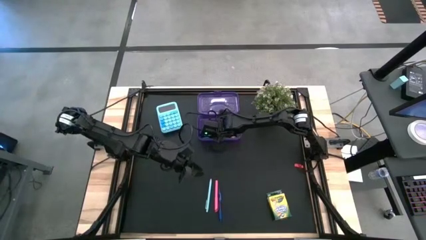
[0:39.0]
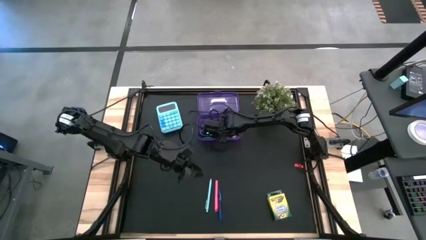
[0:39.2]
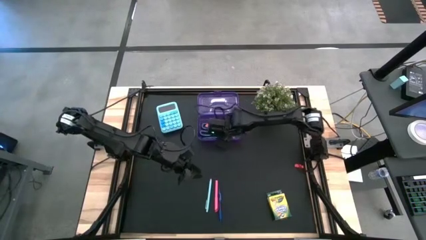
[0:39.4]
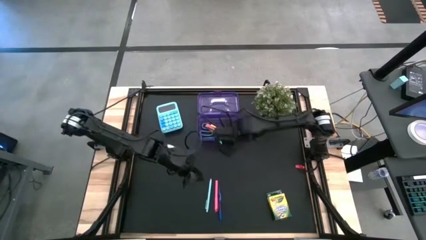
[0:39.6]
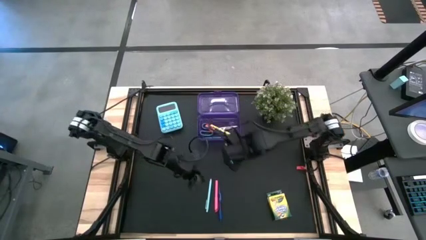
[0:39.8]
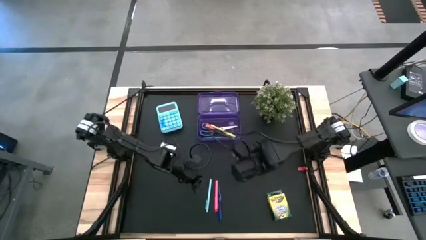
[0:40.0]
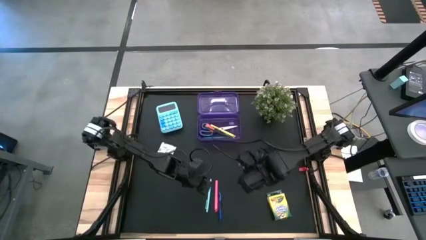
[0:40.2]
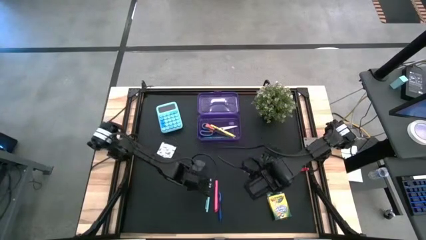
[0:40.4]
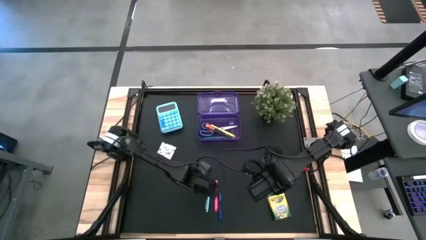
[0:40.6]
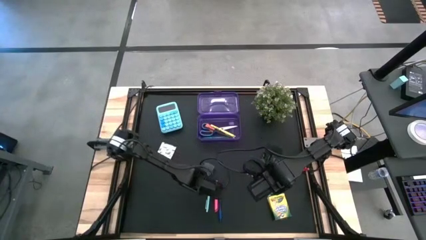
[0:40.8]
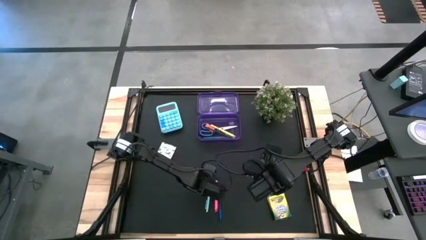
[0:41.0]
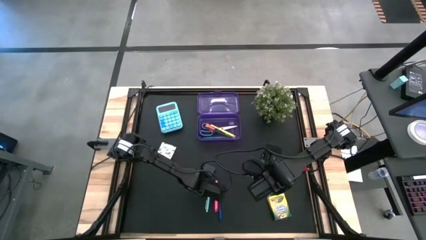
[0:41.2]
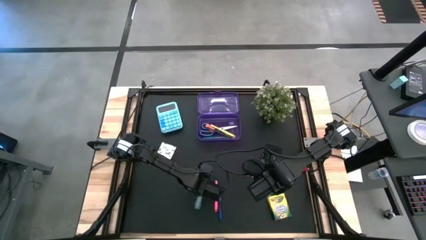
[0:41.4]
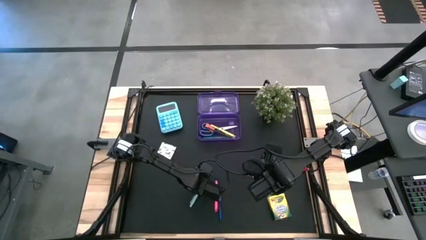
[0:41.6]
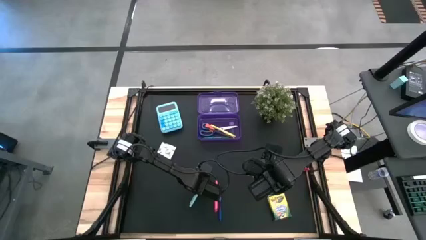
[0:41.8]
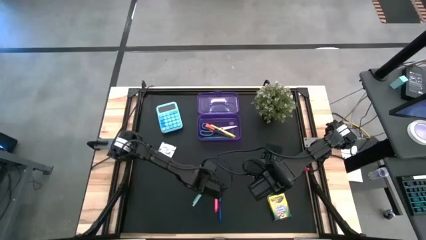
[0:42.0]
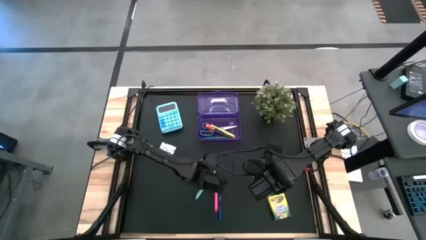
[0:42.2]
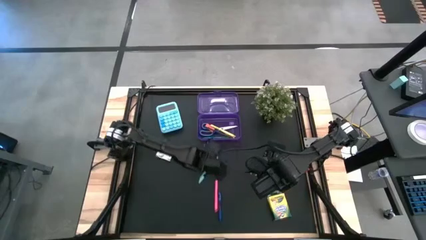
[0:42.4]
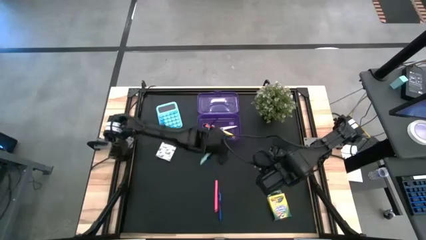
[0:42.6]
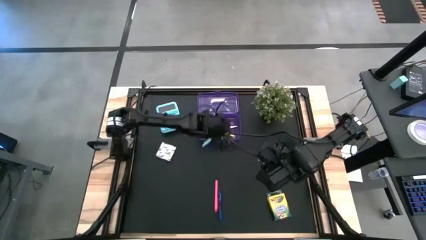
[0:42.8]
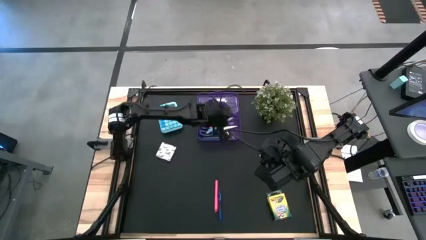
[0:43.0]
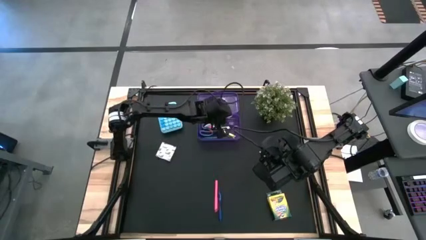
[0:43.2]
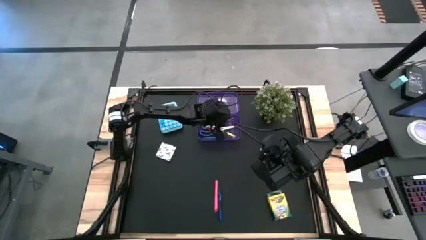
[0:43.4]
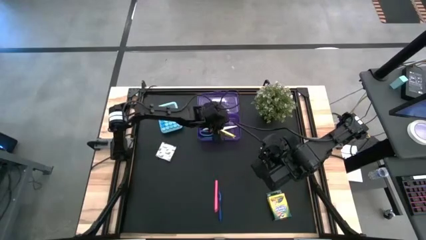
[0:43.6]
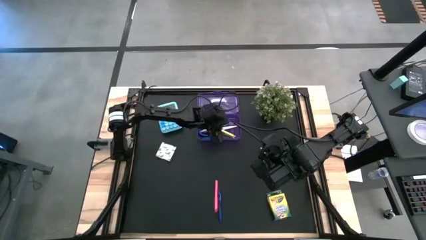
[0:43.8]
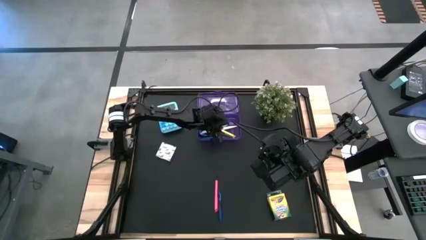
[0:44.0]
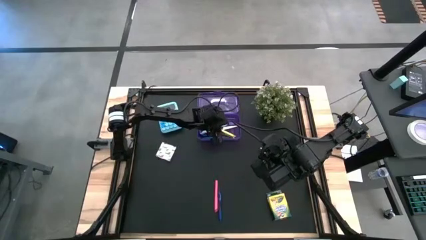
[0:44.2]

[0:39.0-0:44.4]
Task: Pack school essentials
Put the light blue pen into the purple supply box

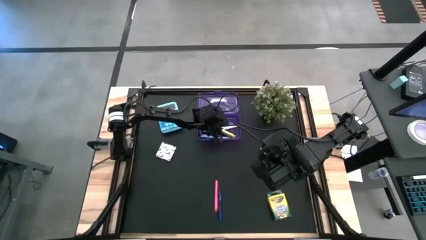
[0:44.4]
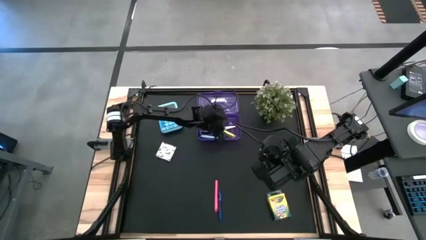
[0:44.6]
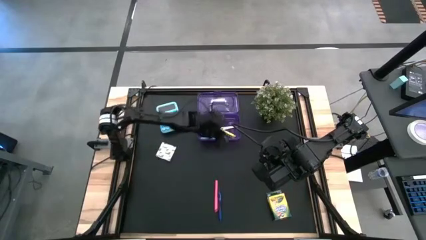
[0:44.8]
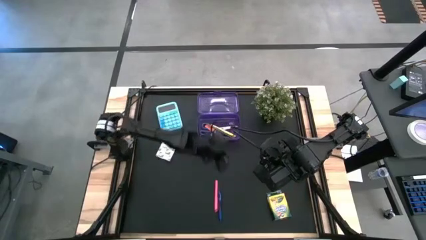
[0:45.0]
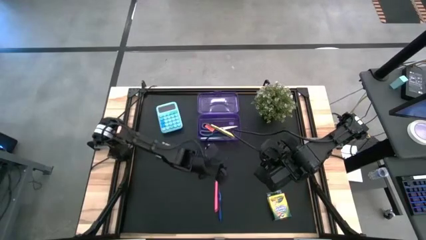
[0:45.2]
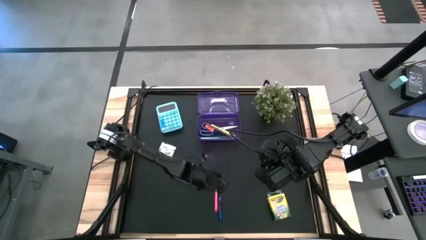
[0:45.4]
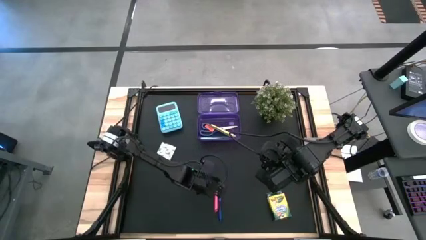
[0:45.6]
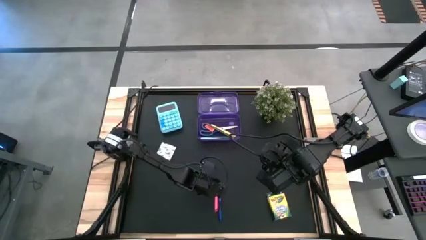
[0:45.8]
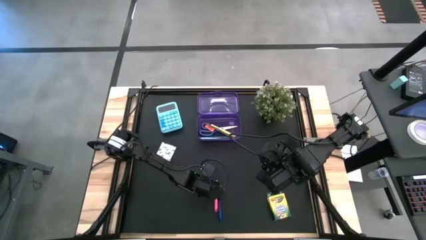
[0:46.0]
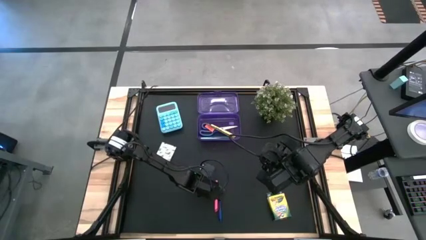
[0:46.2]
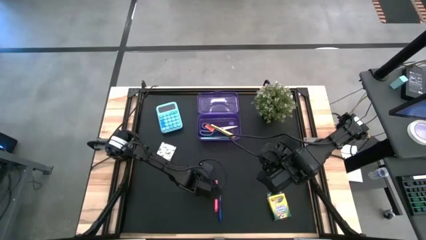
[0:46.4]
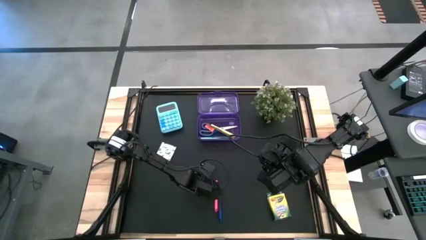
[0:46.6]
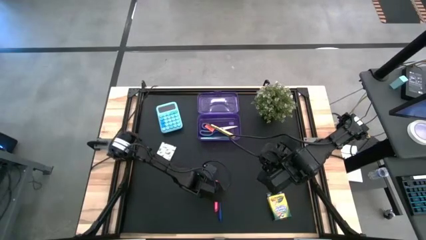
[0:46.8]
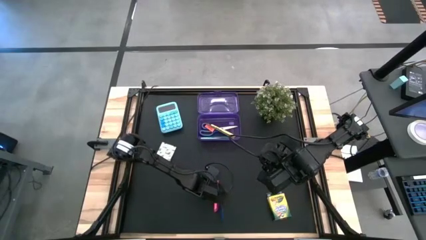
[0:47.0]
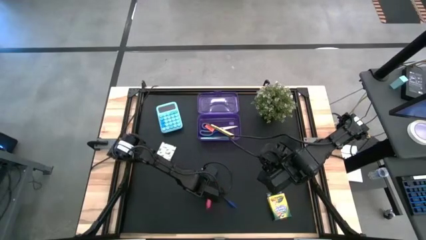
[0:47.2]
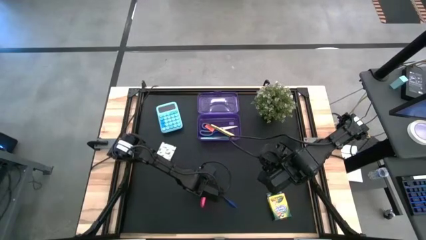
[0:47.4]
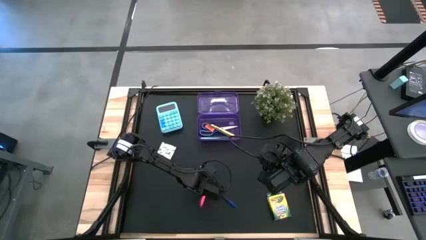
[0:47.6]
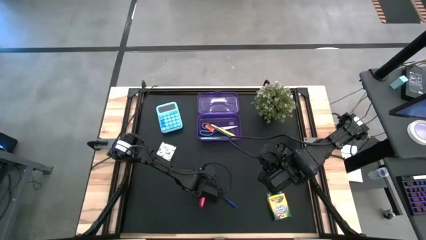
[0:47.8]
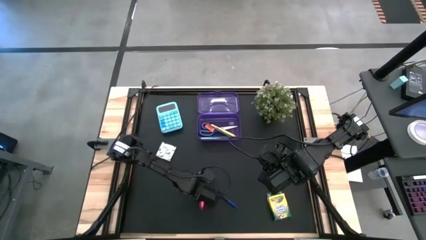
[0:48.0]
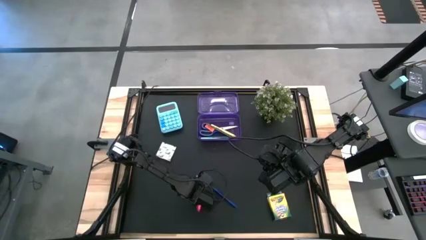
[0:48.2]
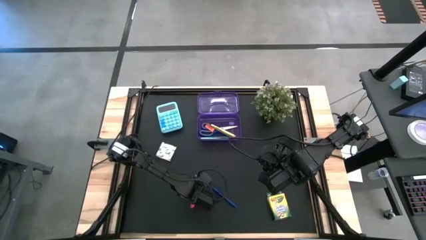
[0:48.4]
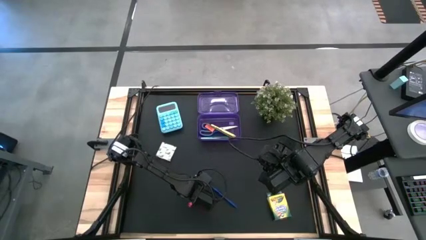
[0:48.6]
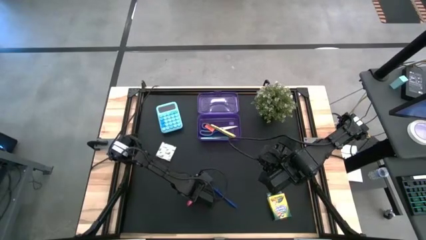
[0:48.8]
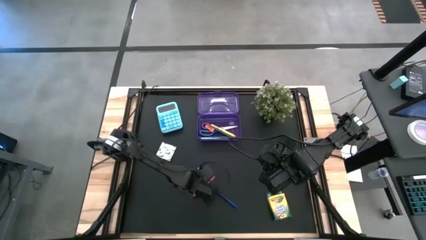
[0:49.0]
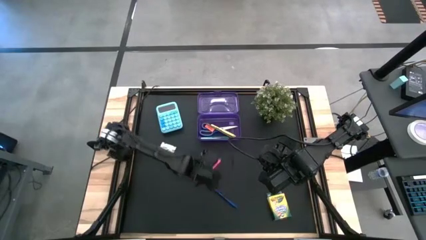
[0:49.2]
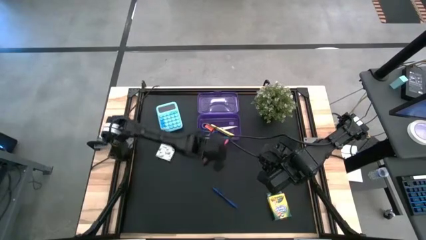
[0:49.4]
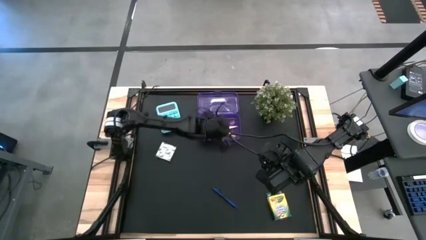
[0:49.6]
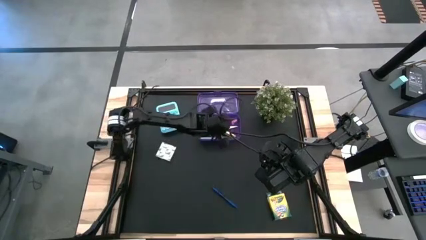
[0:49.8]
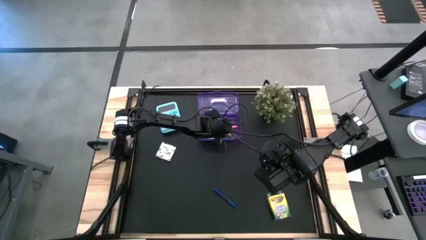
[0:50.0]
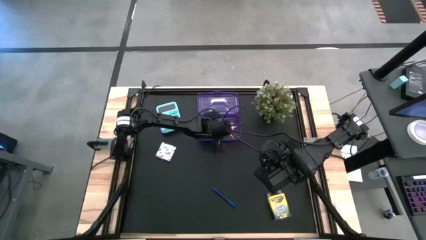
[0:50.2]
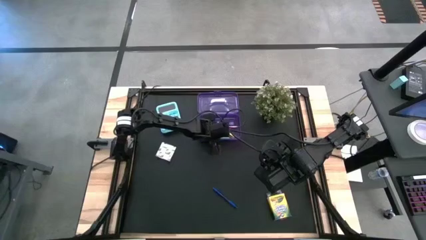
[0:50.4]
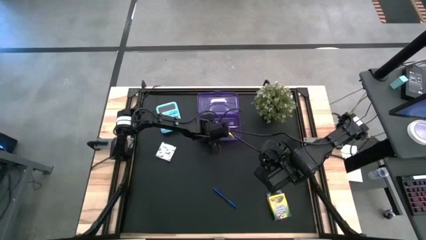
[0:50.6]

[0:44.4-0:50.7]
Put the pink highlighter pen into the purple supply box

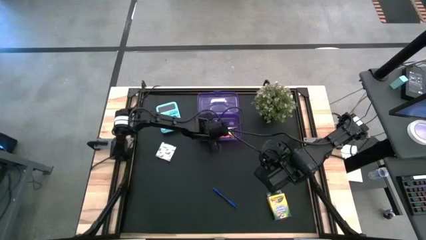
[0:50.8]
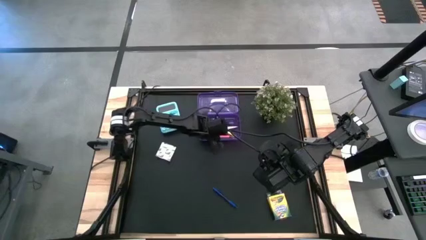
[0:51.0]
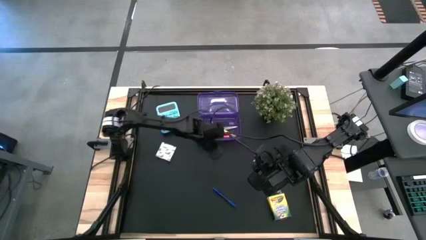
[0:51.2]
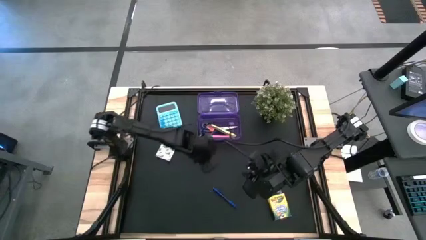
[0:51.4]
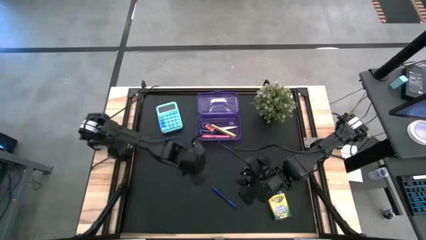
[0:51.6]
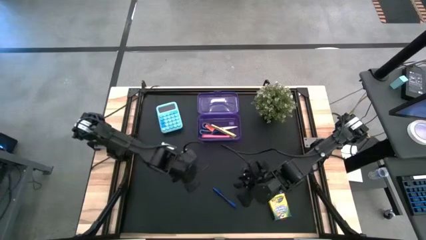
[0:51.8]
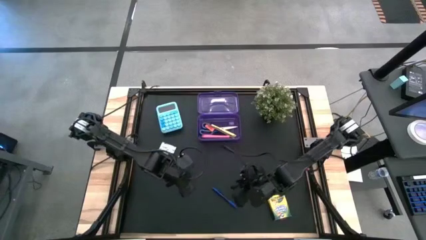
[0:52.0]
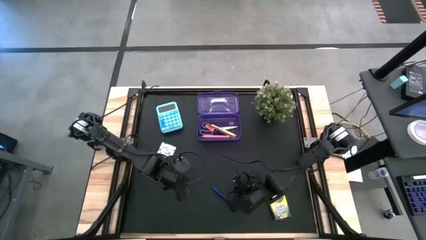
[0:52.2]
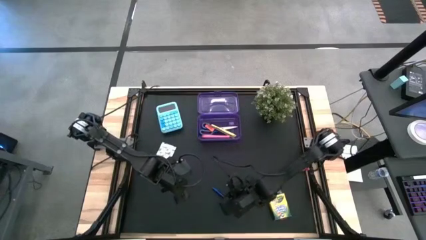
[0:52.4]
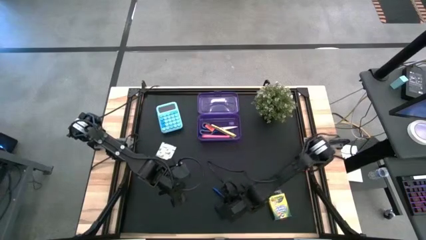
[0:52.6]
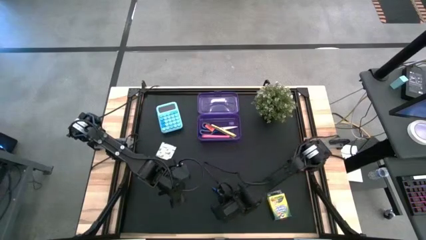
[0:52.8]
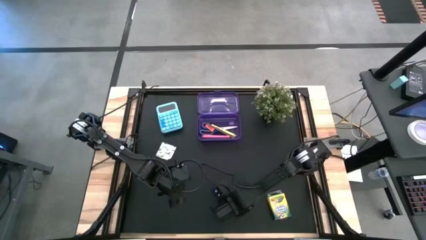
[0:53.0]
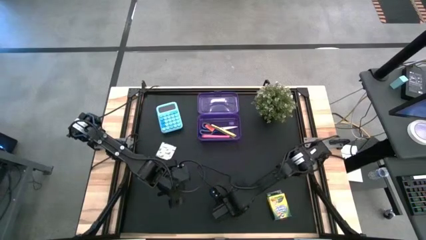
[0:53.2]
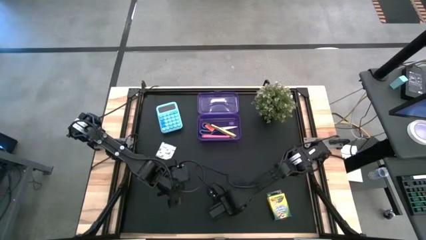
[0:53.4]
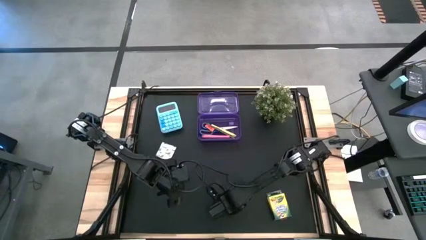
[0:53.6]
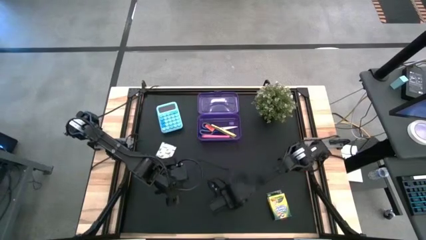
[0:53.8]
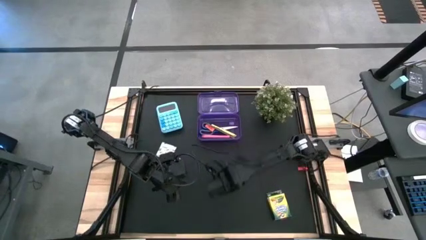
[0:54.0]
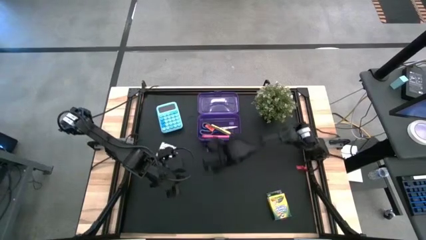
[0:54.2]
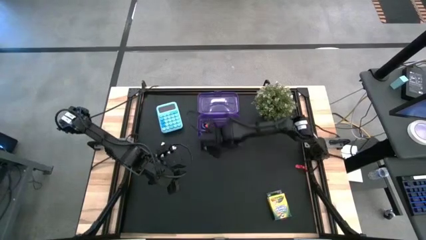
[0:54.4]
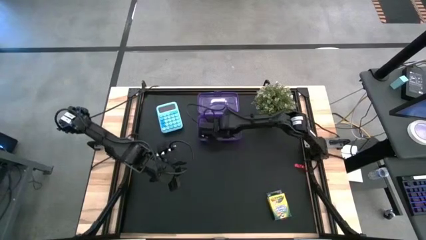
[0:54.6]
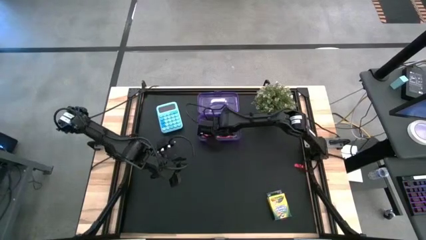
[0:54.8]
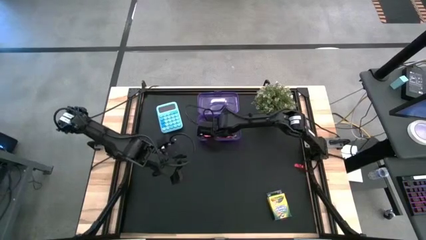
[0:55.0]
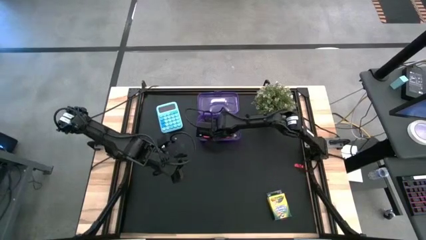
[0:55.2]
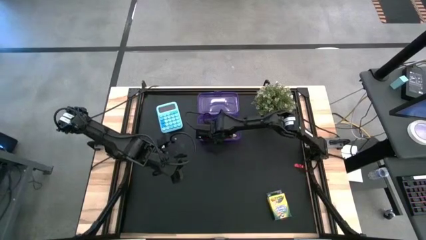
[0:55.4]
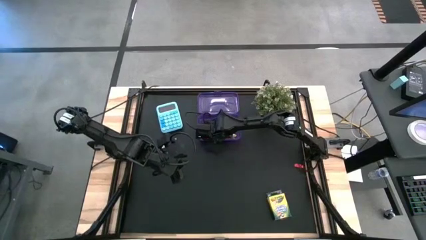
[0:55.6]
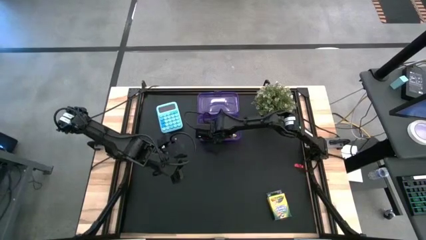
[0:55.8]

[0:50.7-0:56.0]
Put the blue pen into the purple supply box
